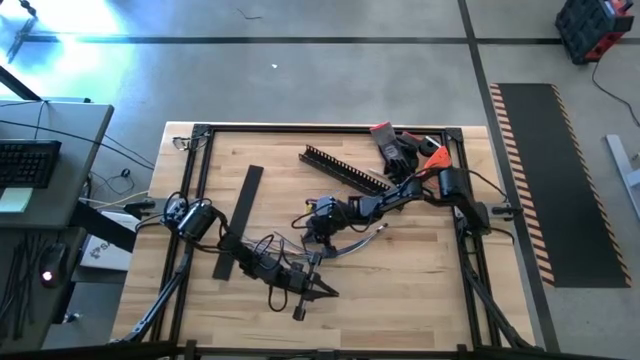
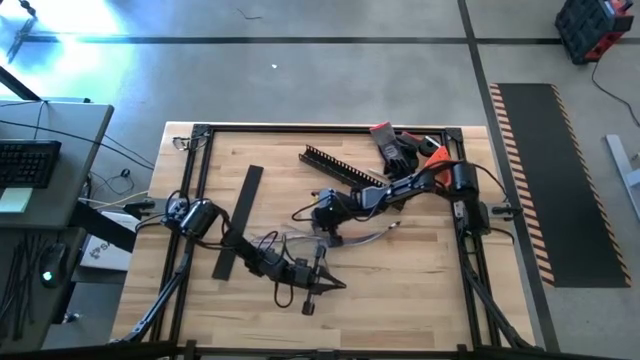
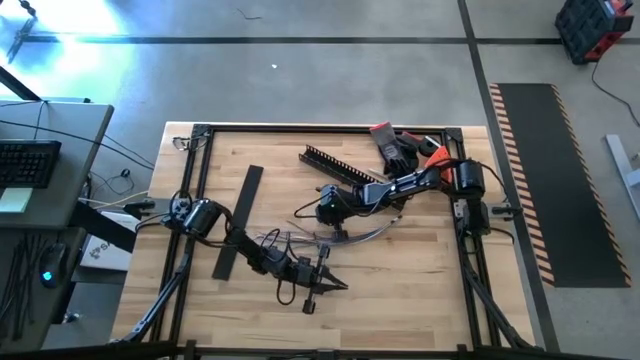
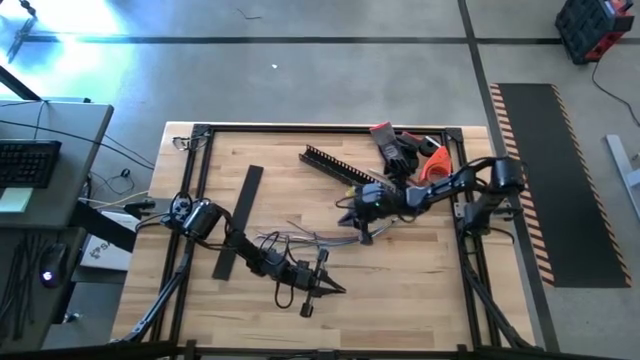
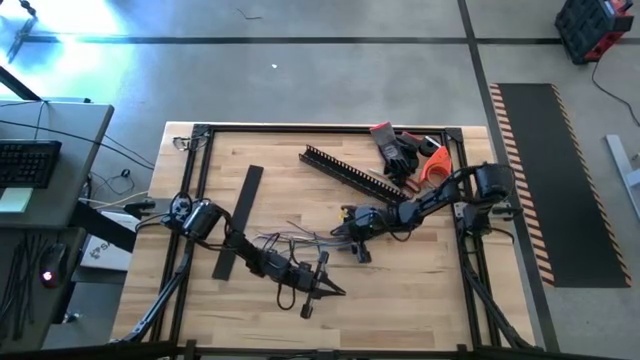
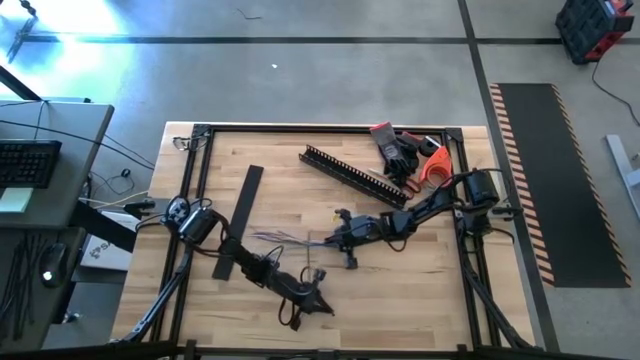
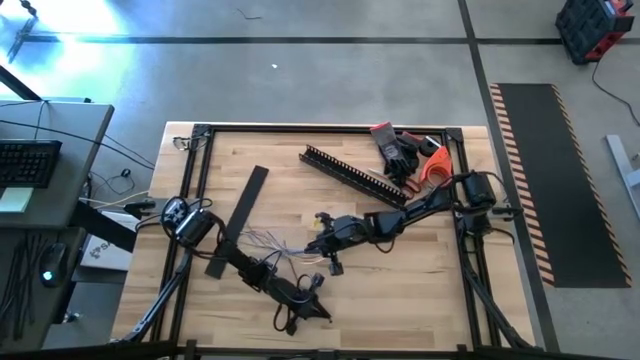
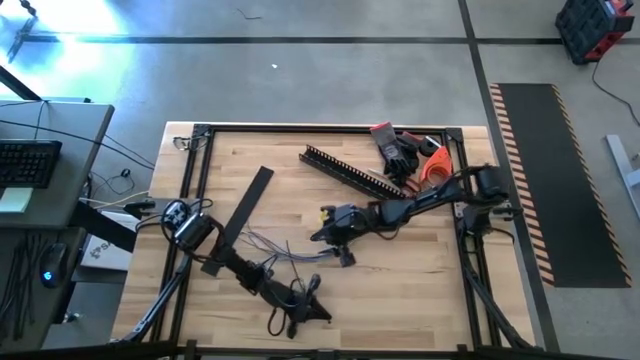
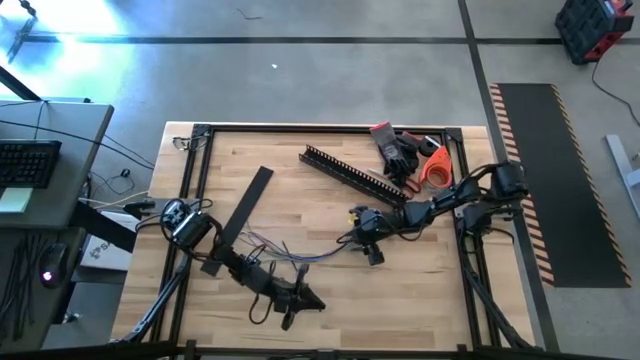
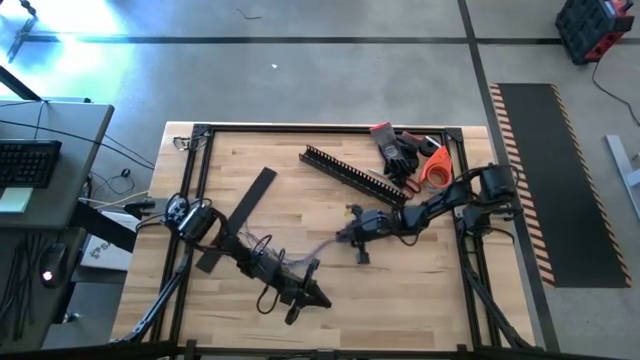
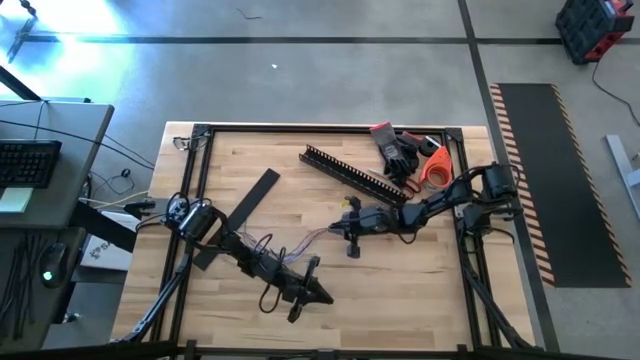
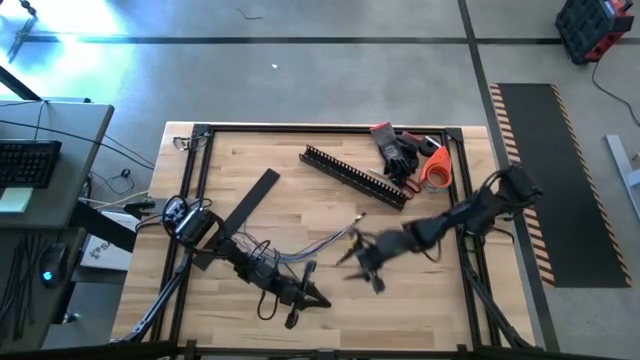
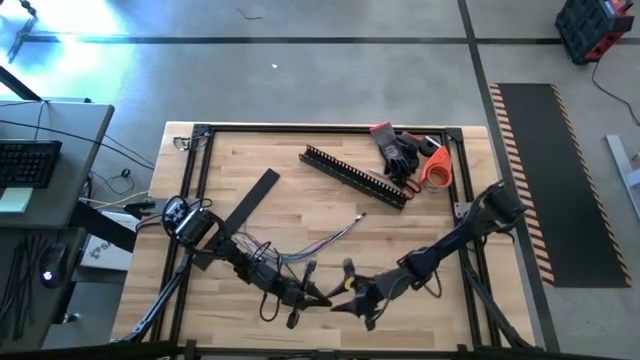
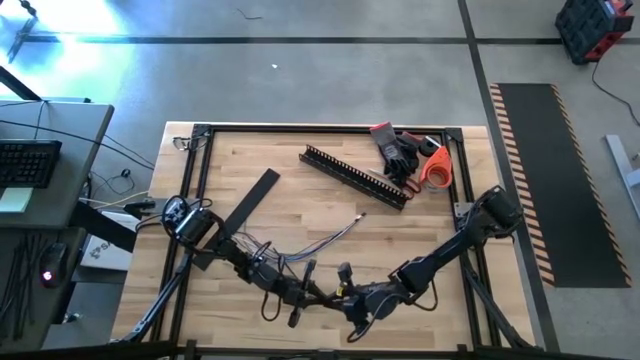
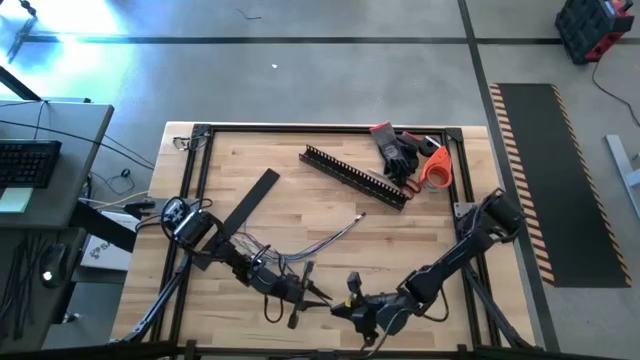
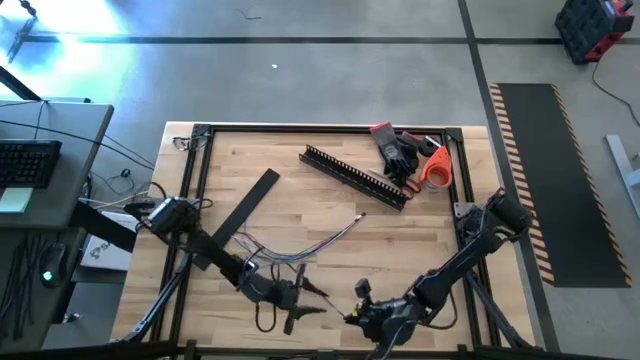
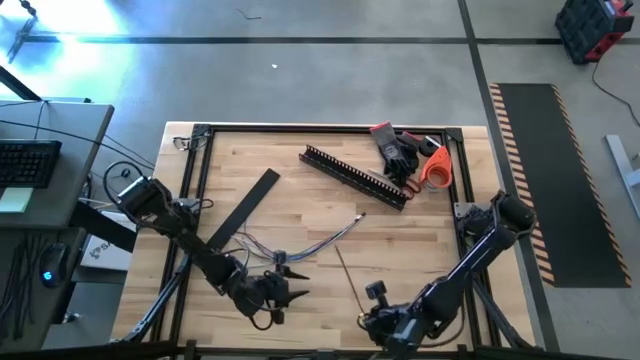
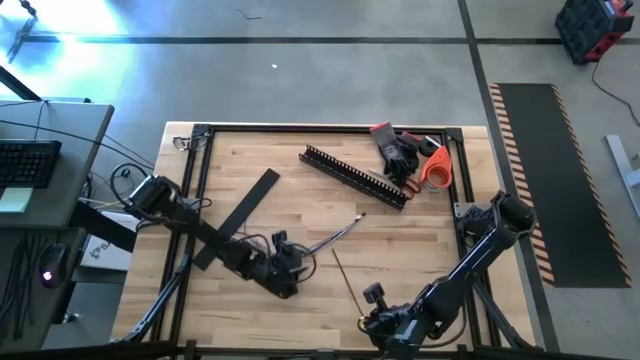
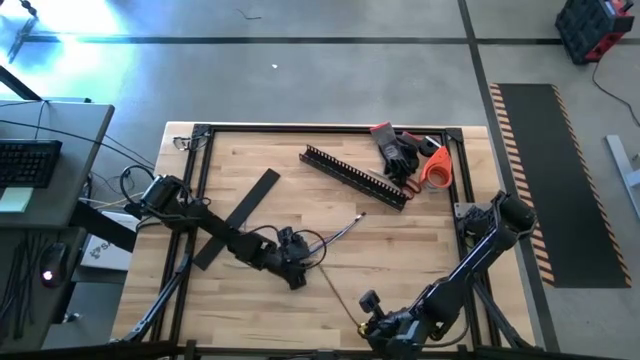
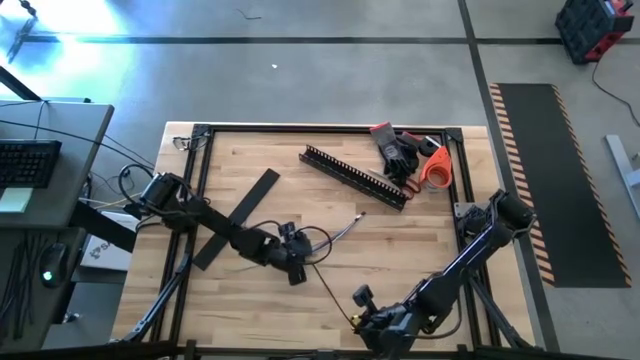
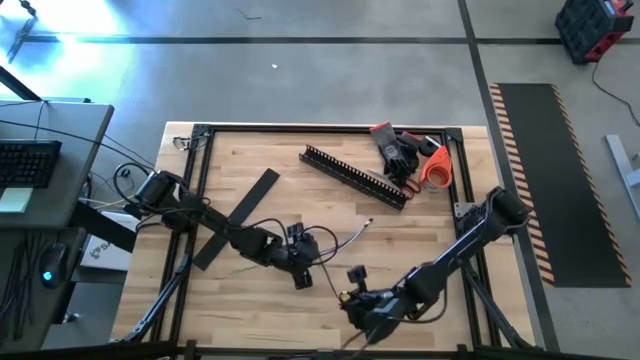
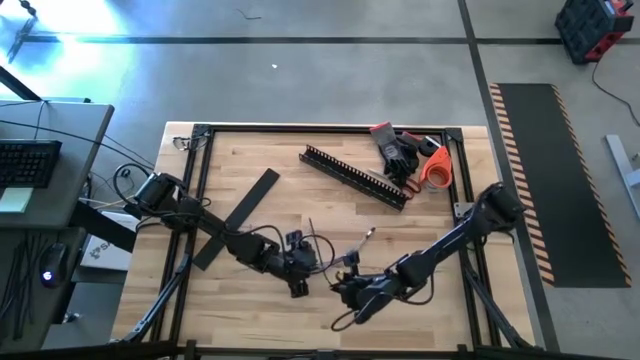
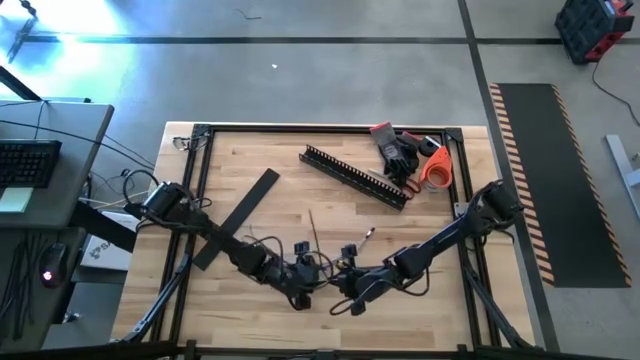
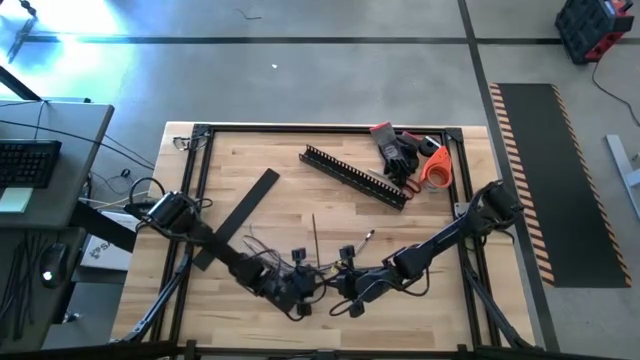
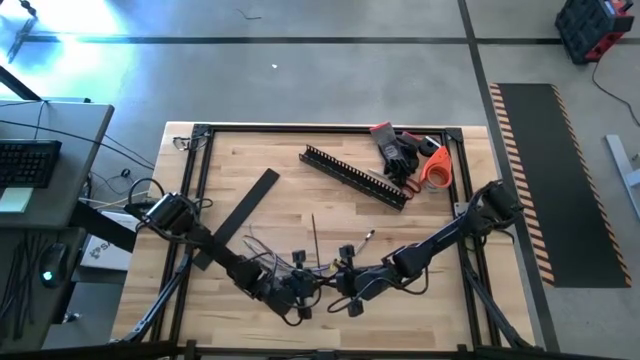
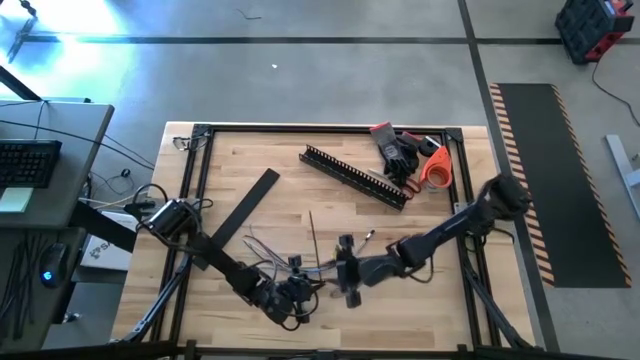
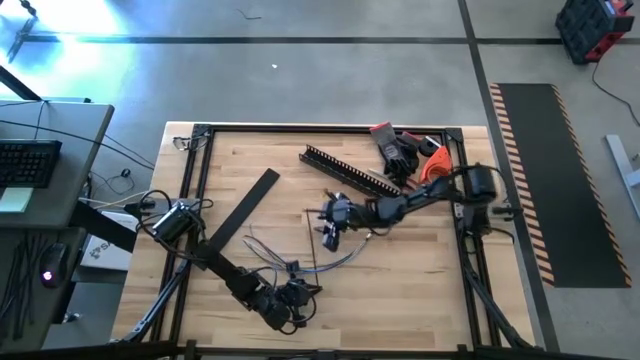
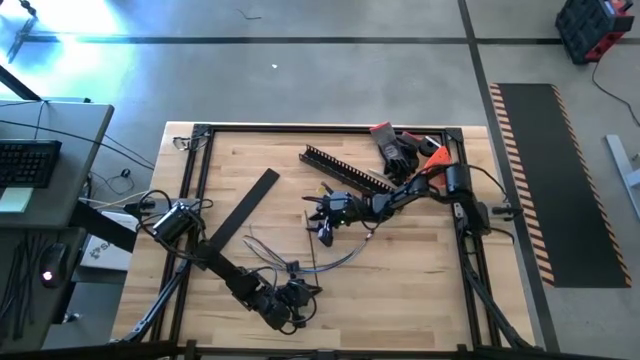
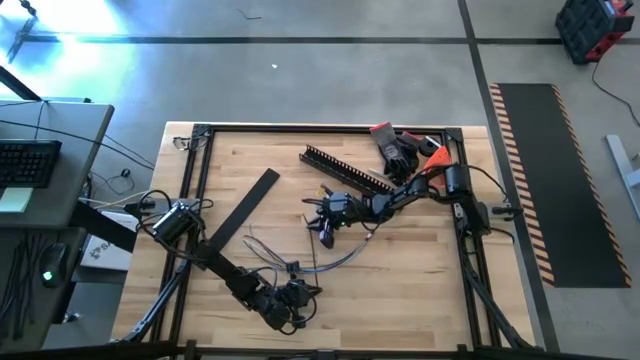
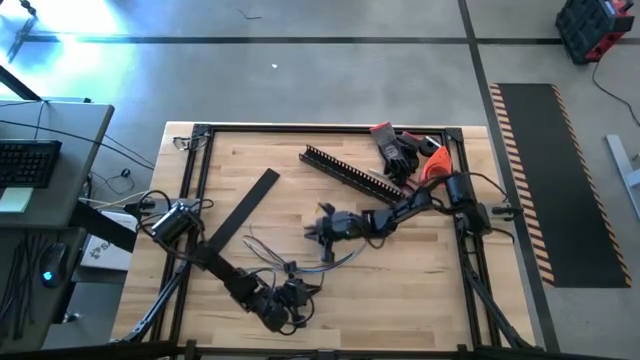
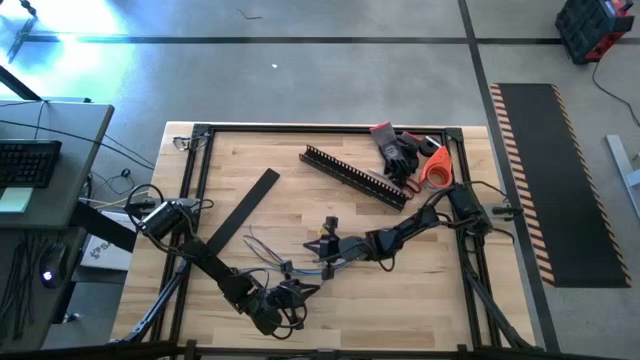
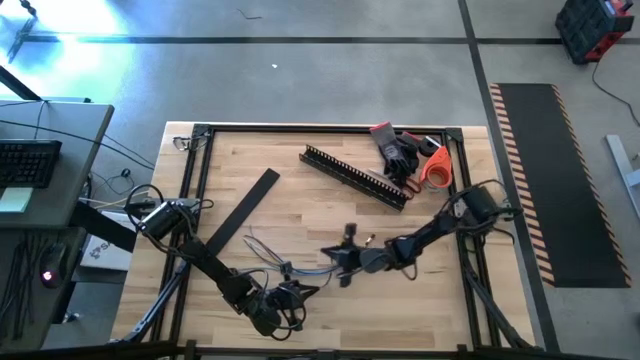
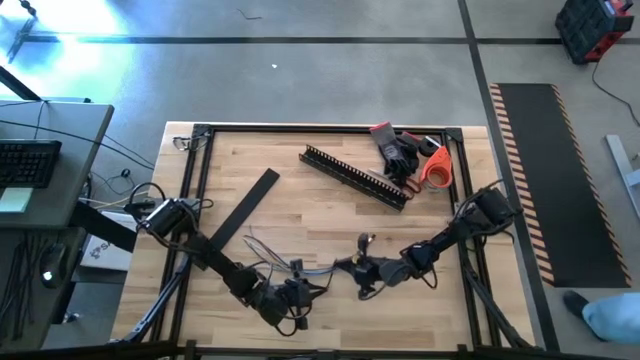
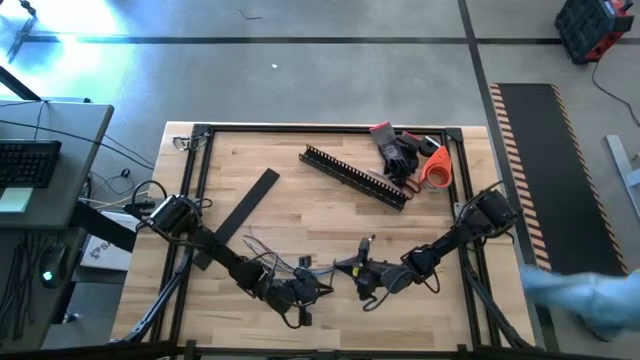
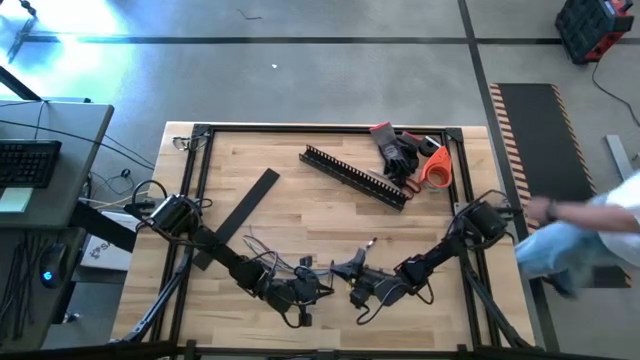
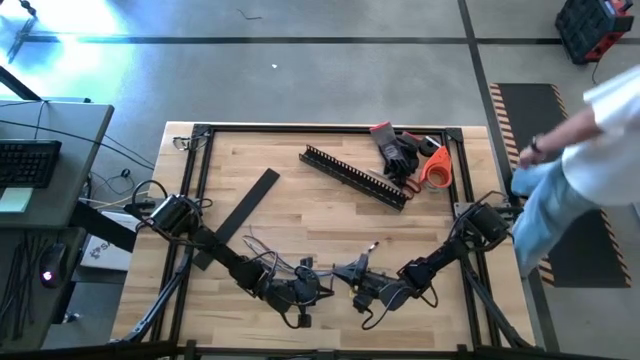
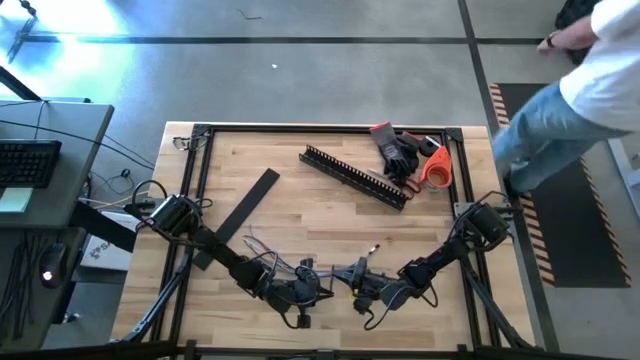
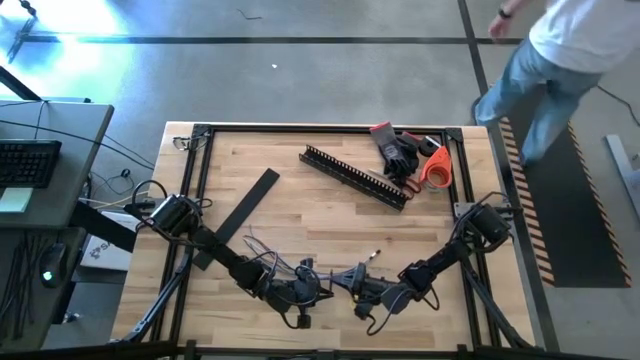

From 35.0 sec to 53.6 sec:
Task: Ziptie cables
Wrap the black zip tie on the cables

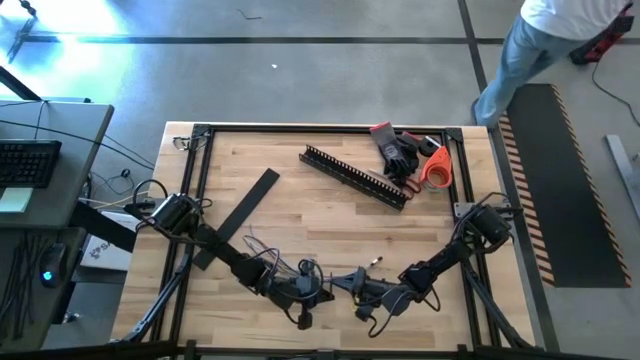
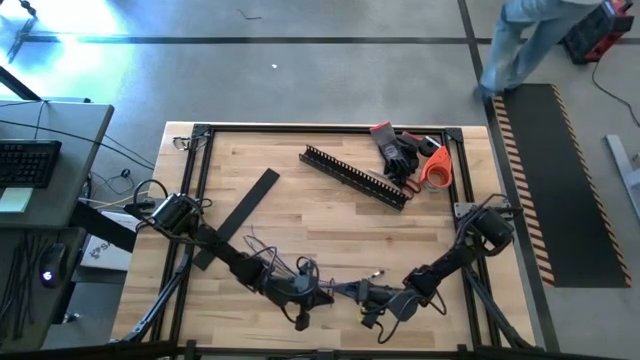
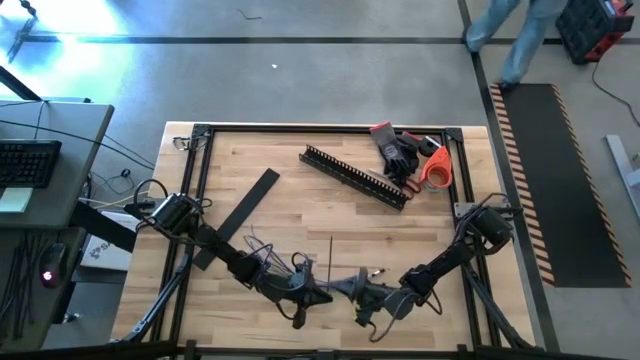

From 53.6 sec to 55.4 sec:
Wrap the black zip tie on the cables
